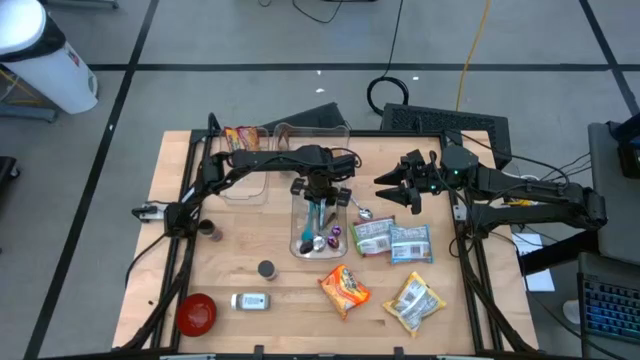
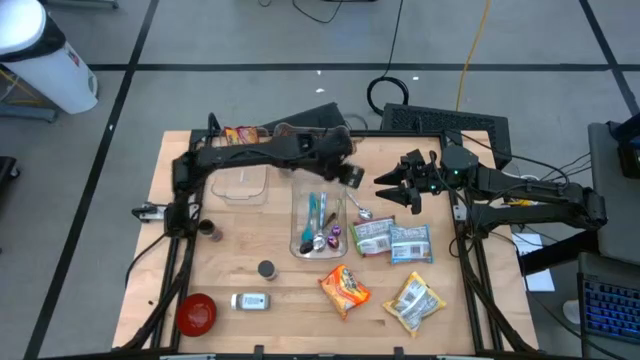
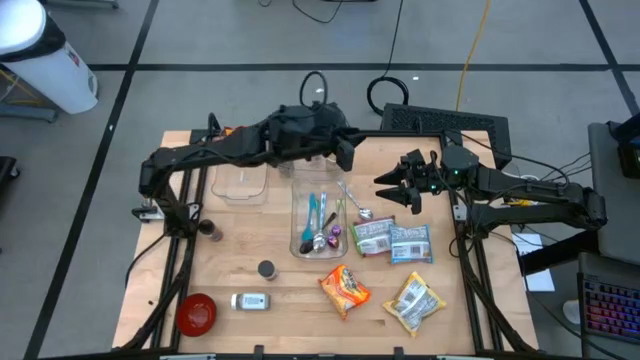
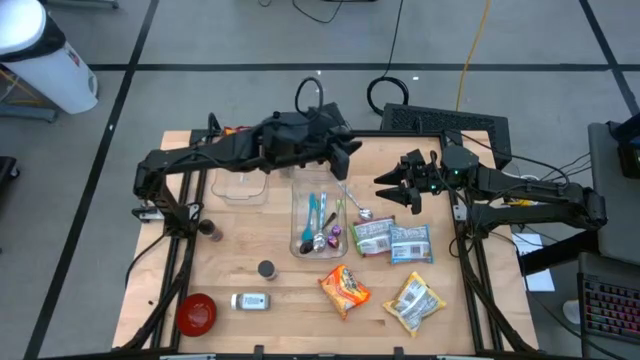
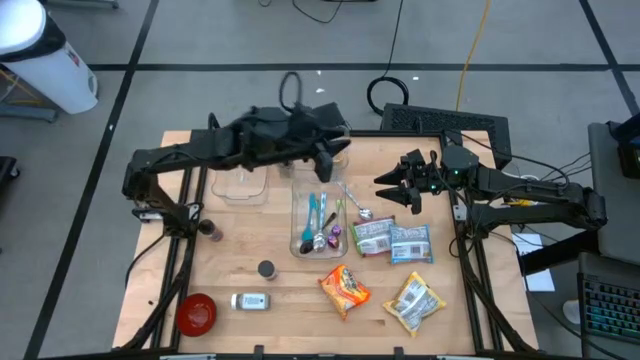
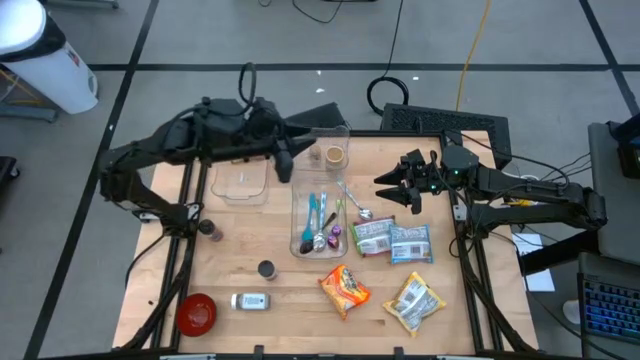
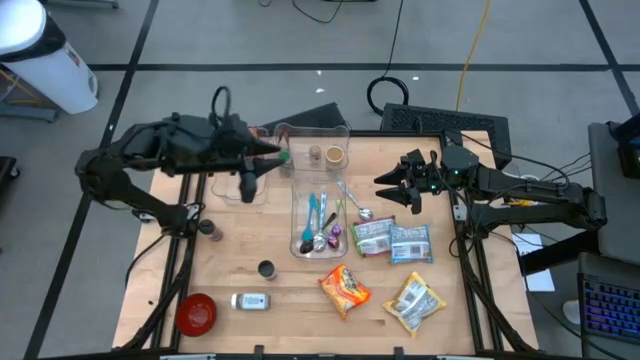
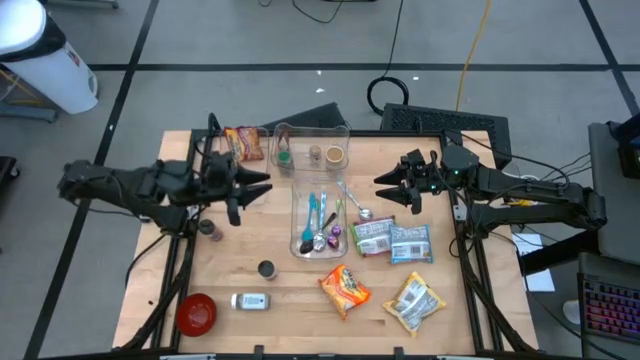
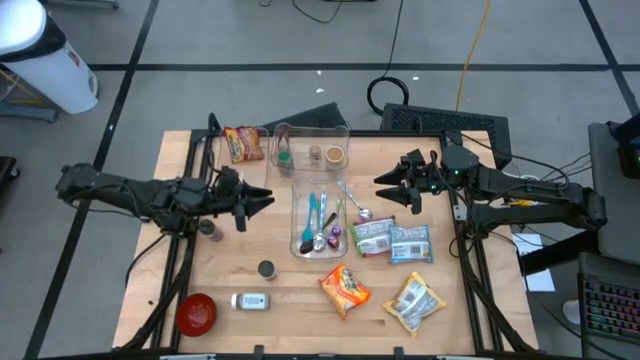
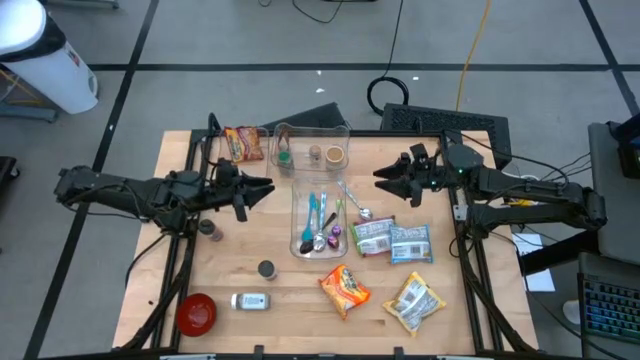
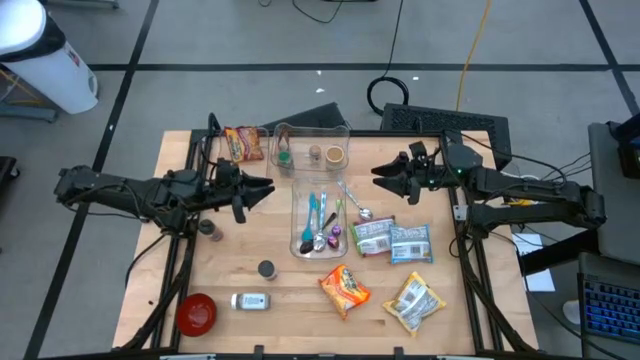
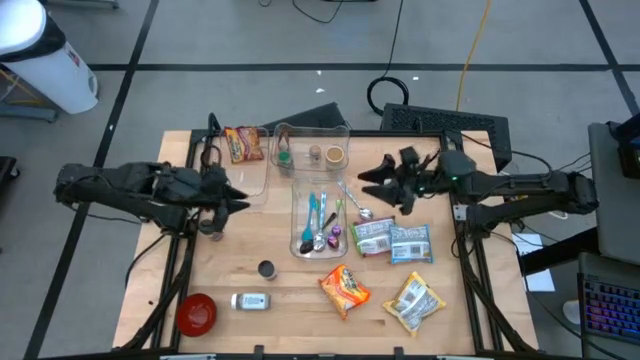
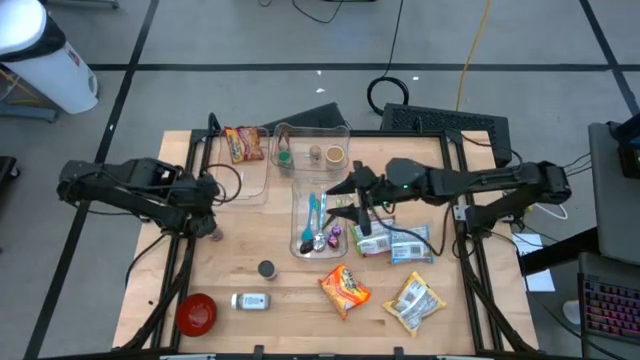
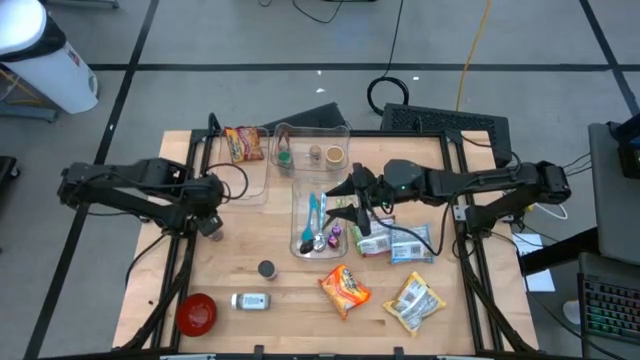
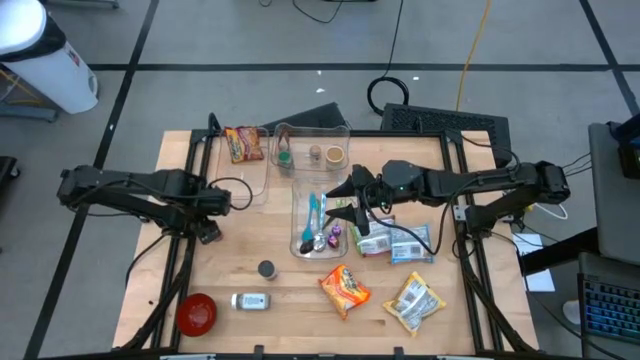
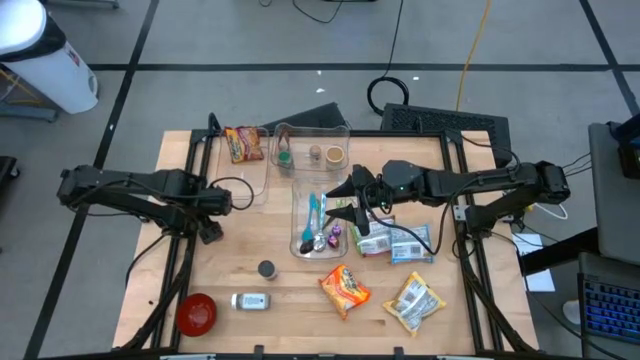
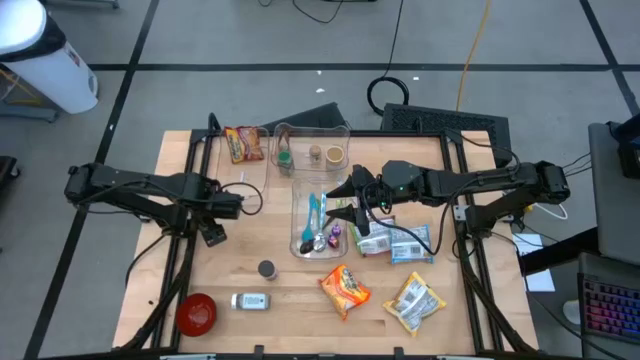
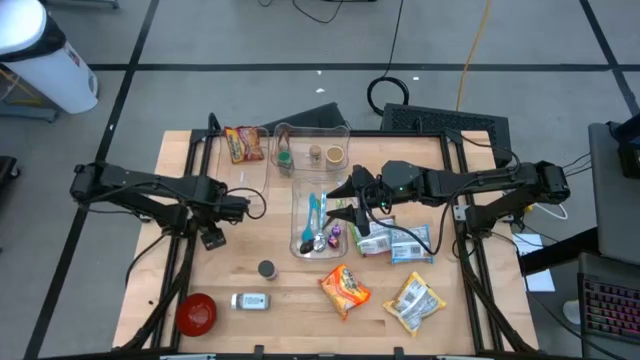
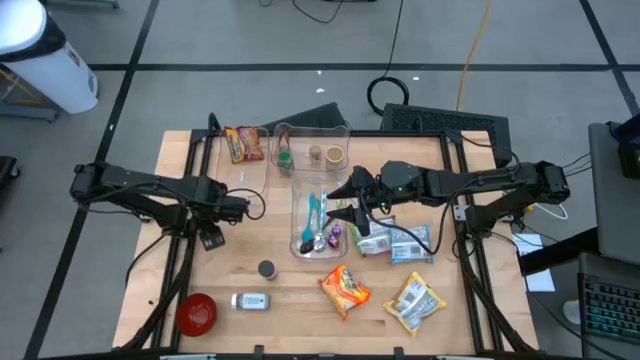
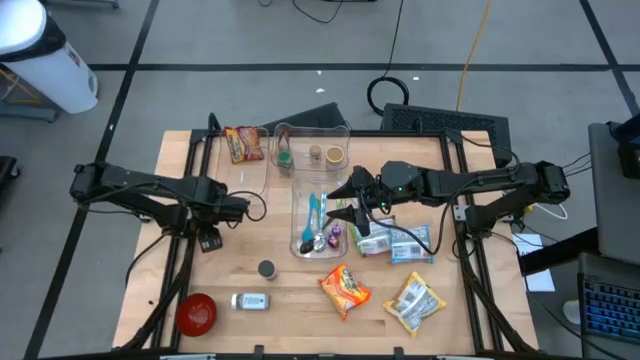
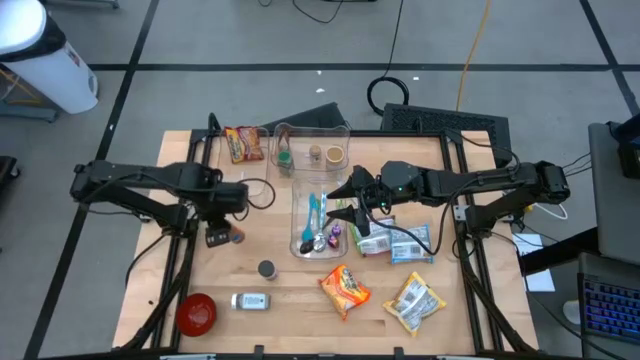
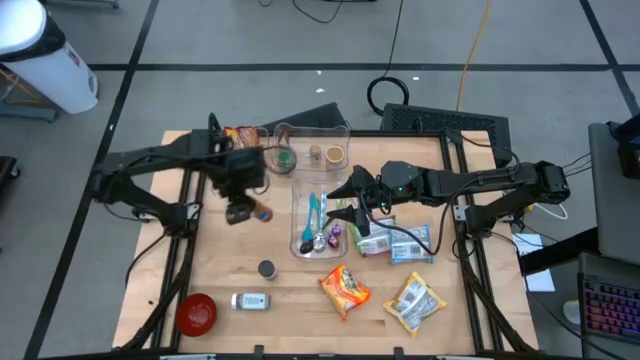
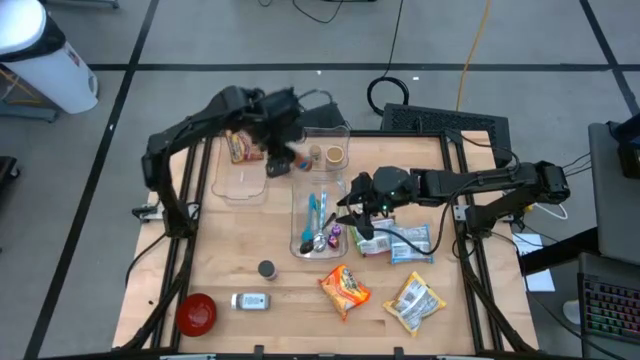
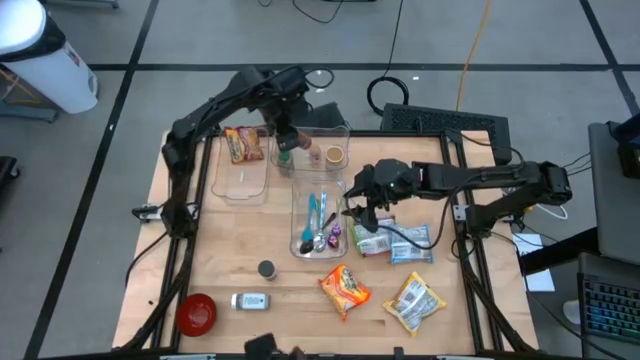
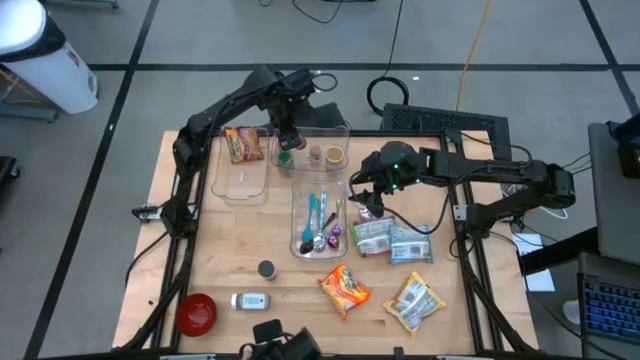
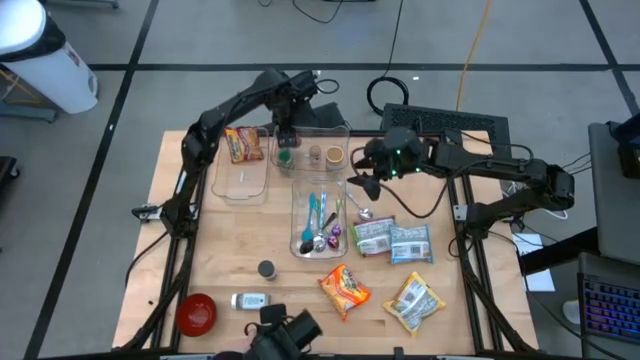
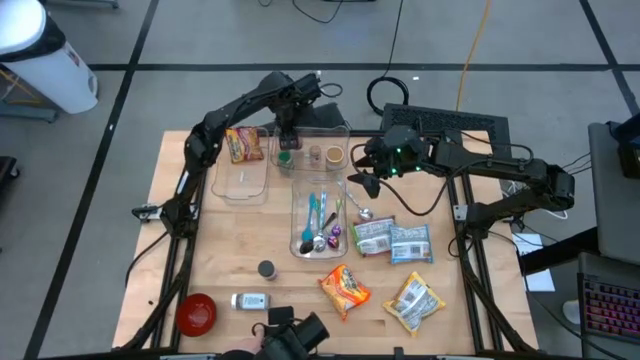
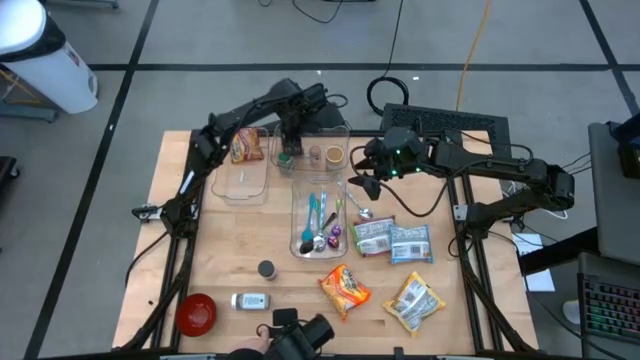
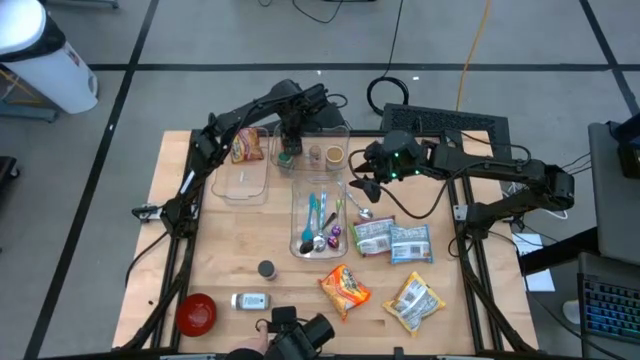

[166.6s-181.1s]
Task: Pick & Place Food Item
Put the orange seasoning bottle into the top right transparent bin
